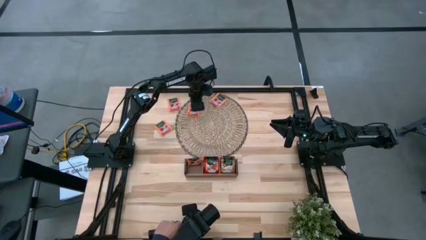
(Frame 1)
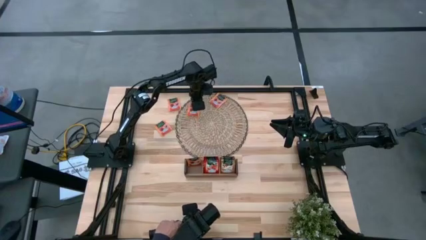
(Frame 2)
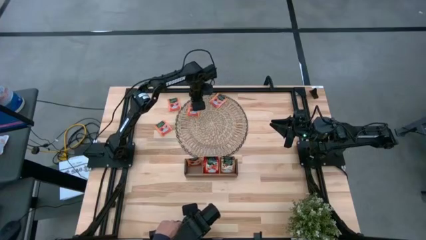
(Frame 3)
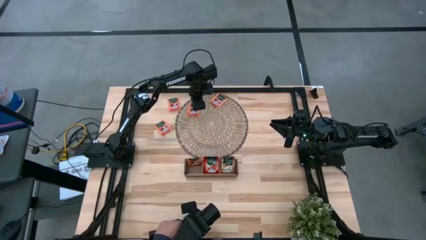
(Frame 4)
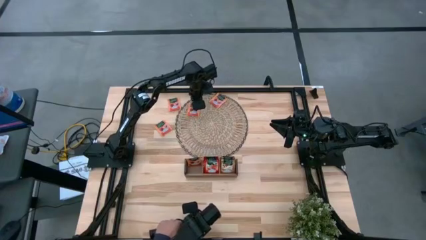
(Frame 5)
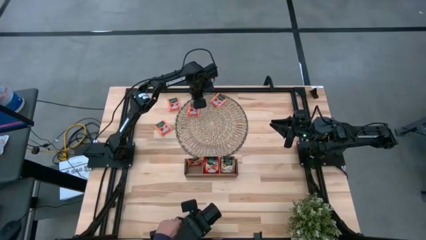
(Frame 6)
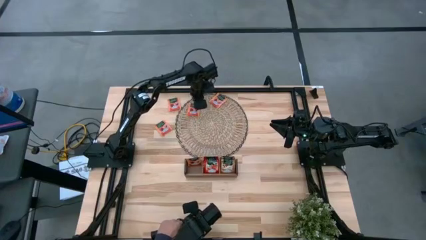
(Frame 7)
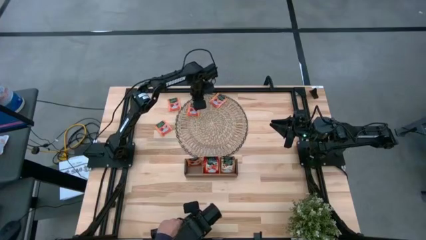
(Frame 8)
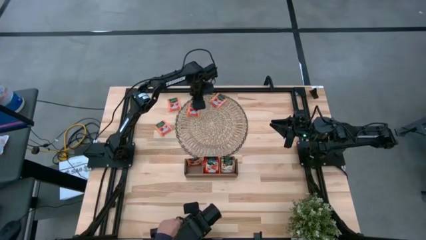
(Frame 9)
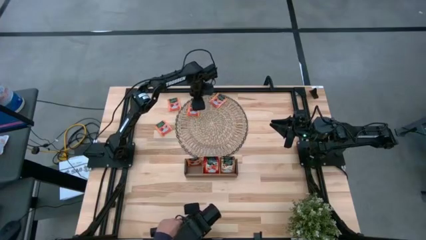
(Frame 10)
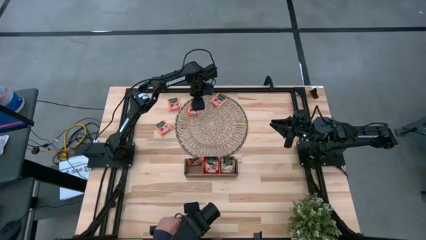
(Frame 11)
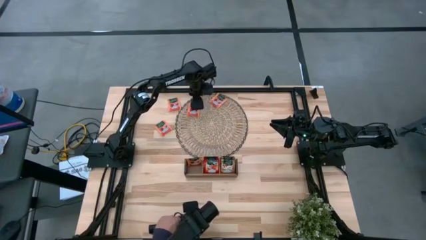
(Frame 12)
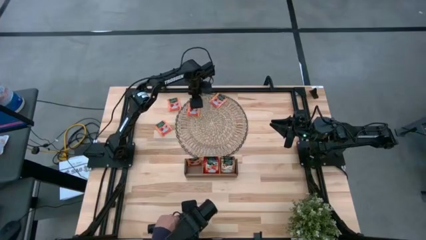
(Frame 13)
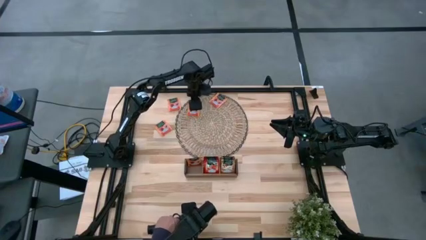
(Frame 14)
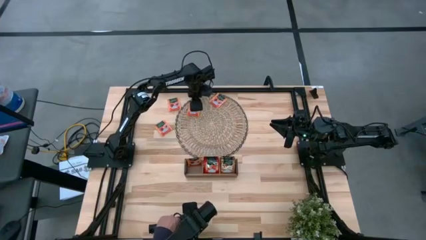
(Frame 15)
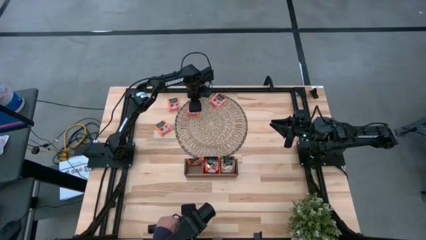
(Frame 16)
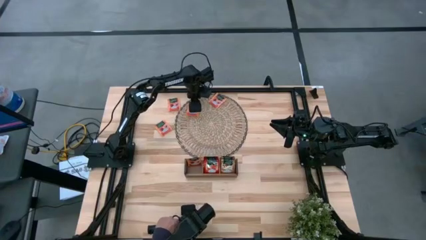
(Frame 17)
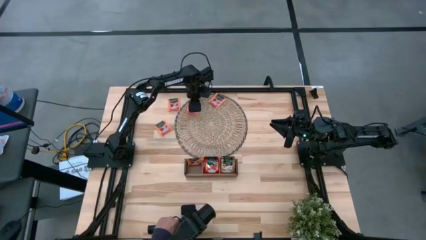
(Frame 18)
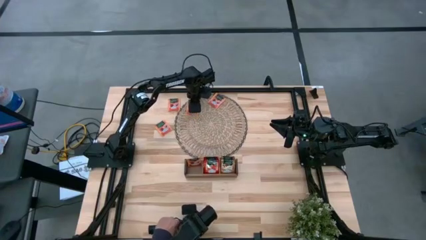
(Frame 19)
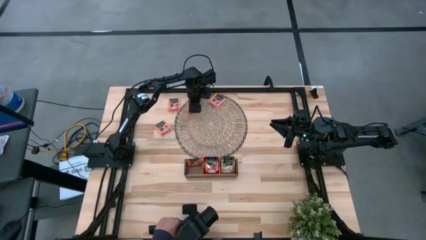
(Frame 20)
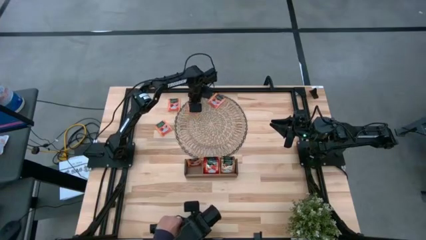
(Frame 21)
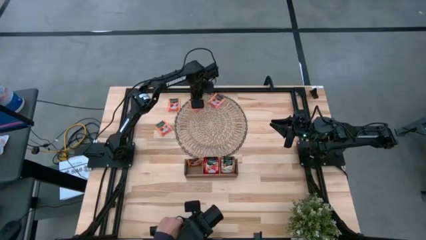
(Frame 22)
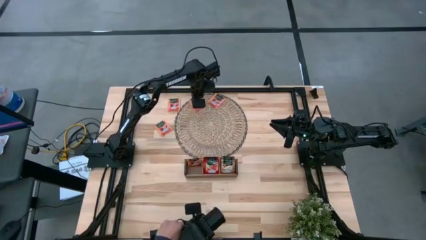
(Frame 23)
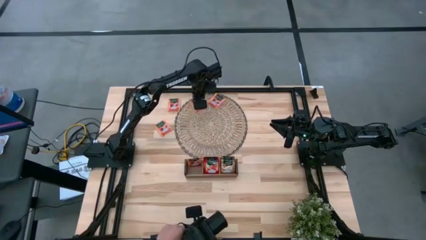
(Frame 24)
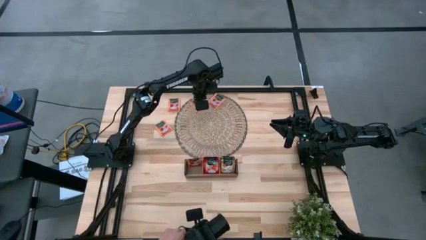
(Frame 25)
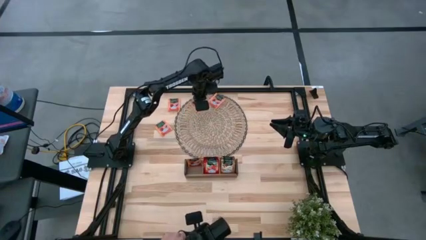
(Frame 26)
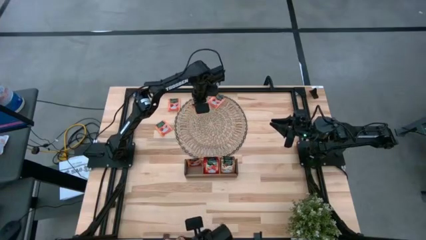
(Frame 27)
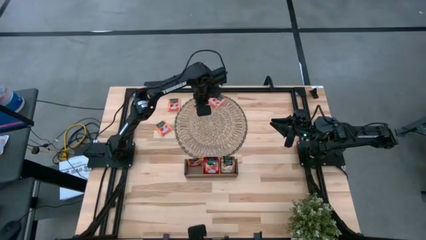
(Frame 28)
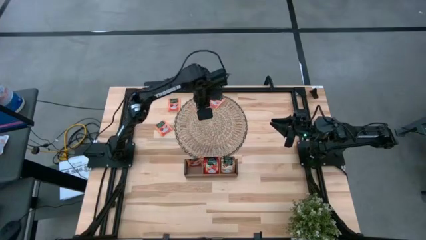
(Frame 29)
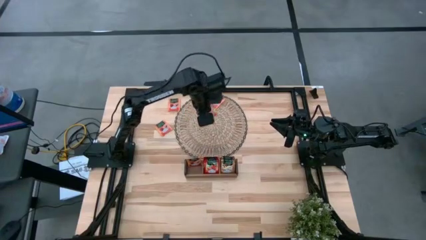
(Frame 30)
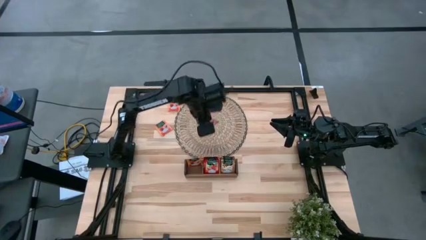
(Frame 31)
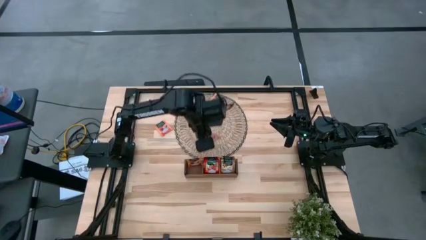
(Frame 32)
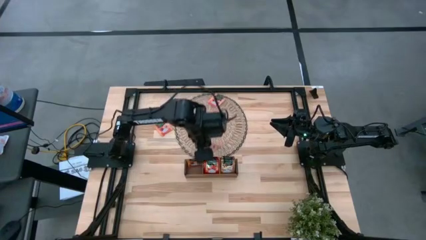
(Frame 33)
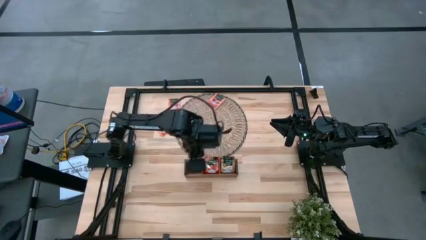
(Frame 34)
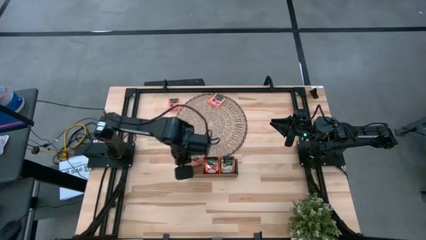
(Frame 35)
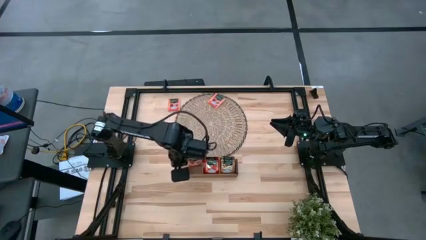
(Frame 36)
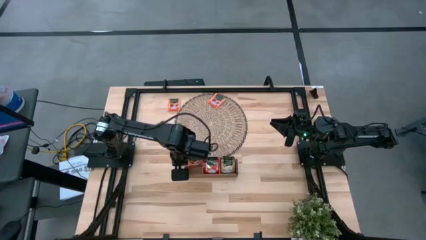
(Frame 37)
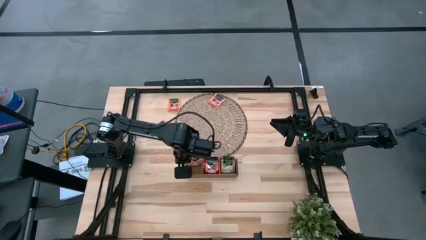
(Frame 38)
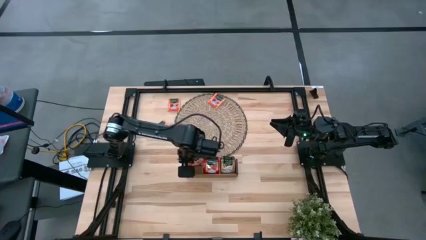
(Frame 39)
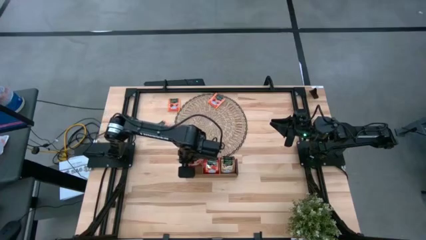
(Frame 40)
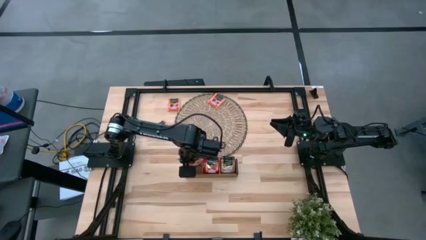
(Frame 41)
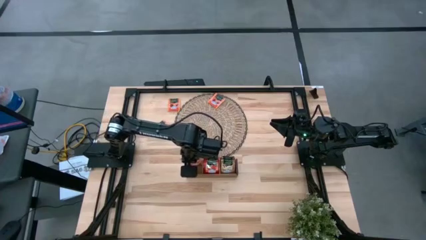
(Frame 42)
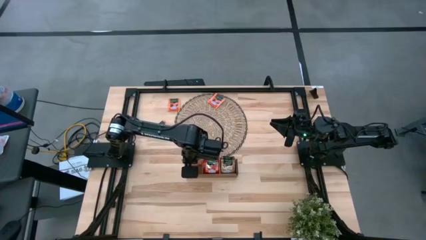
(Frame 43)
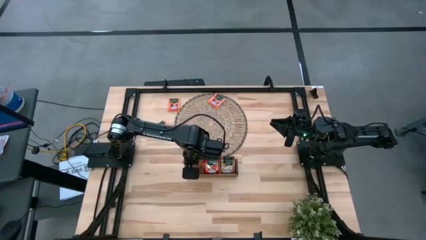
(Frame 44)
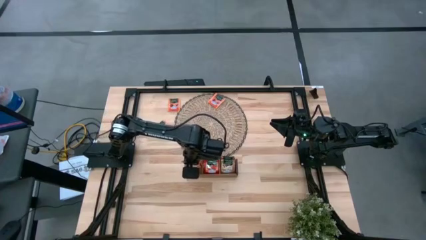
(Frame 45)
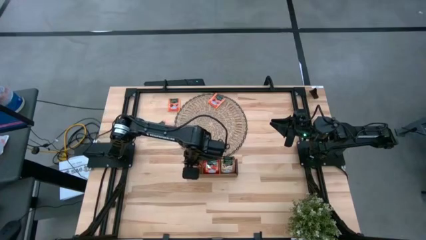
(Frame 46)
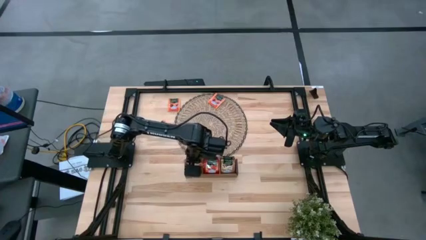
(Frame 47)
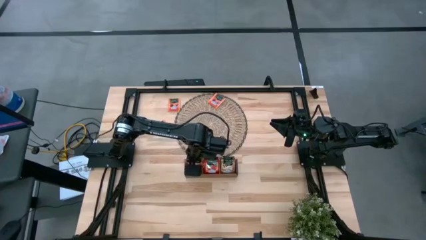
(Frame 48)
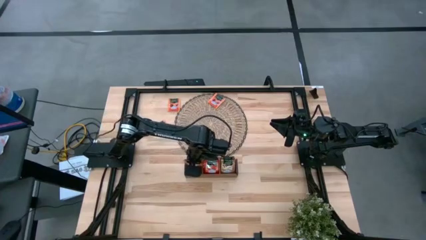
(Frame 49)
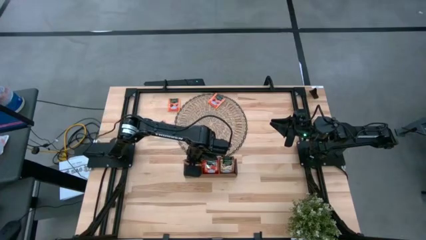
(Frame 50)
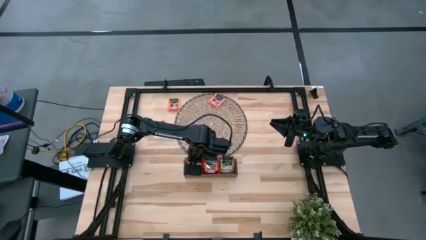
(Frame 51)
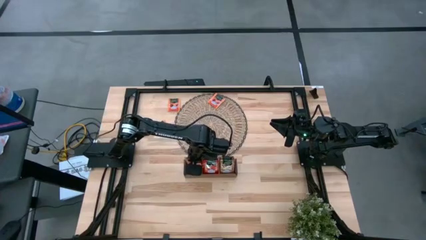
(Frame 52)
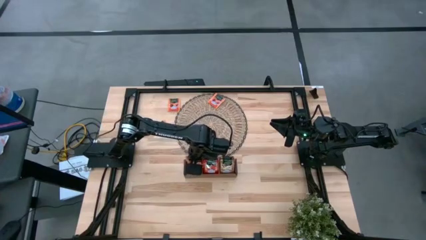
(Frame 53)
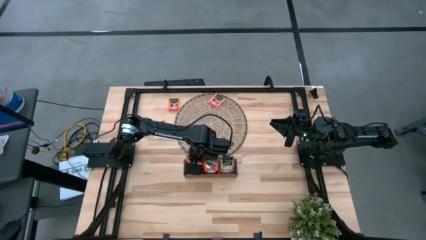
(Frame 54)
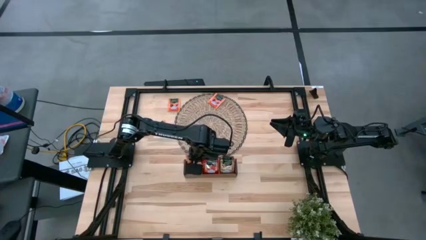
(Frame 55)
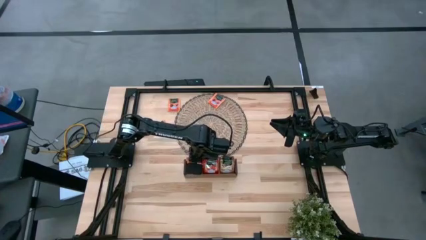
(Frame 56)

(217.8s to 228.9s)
Task: Pick & Place Tea
Put the orange tea bag into the left section of the wooden organizer
